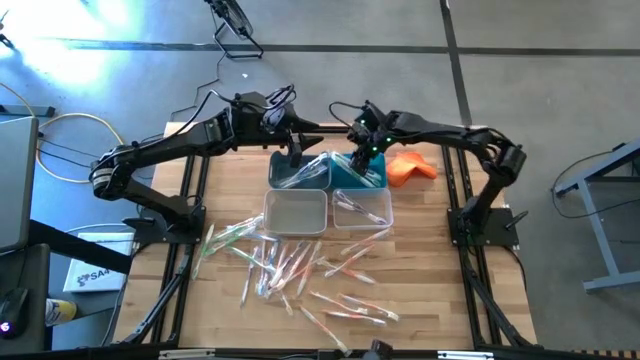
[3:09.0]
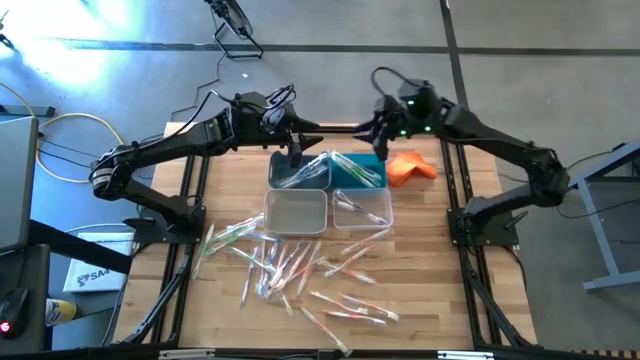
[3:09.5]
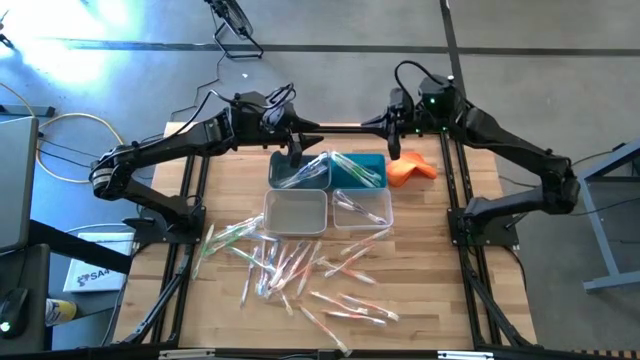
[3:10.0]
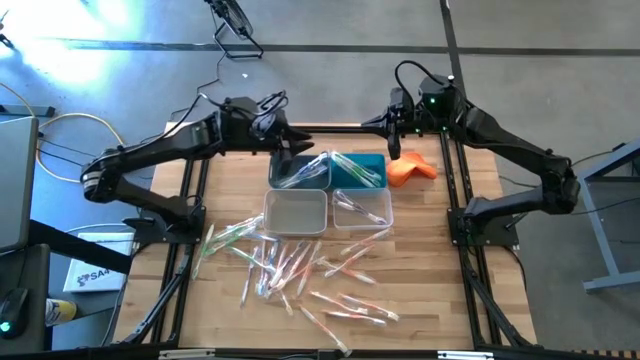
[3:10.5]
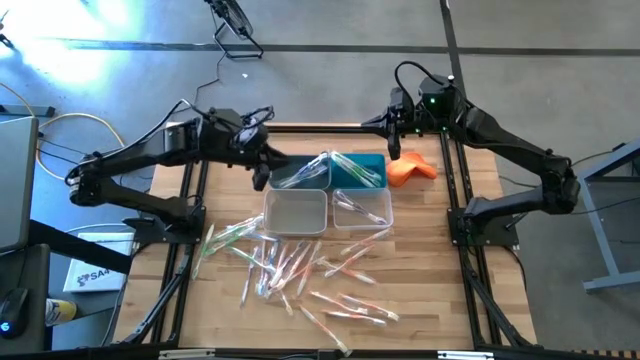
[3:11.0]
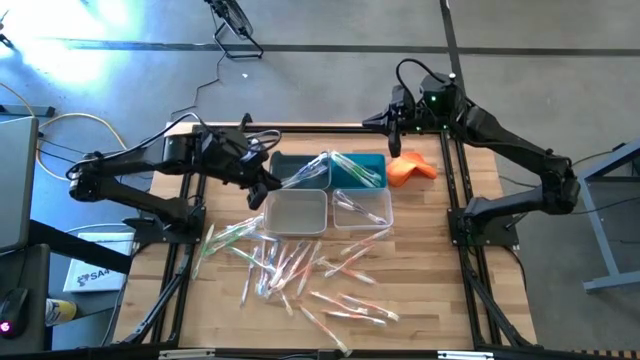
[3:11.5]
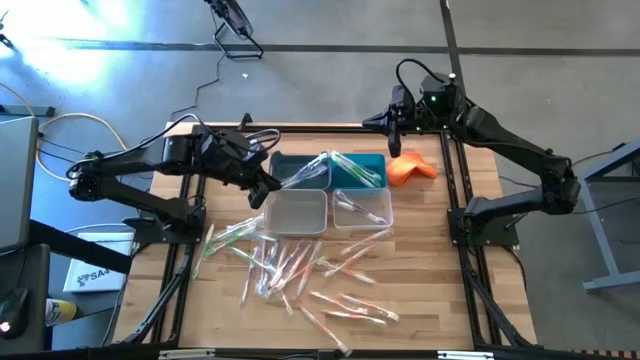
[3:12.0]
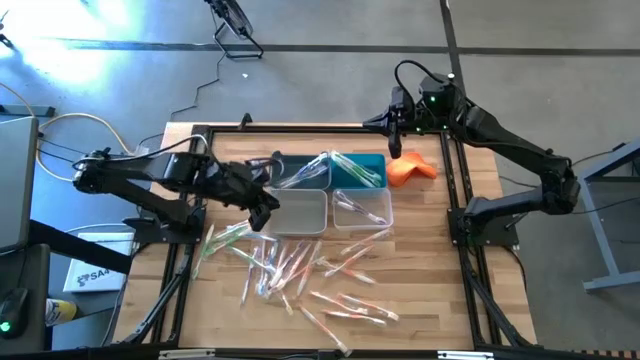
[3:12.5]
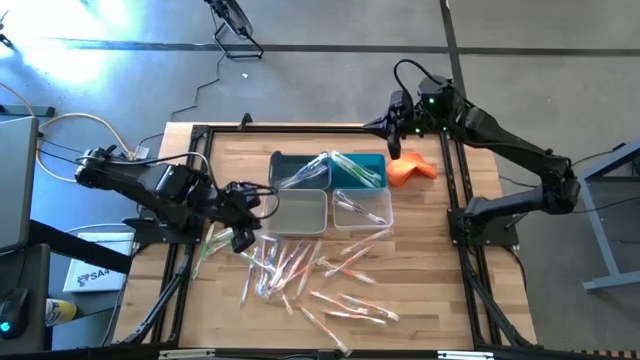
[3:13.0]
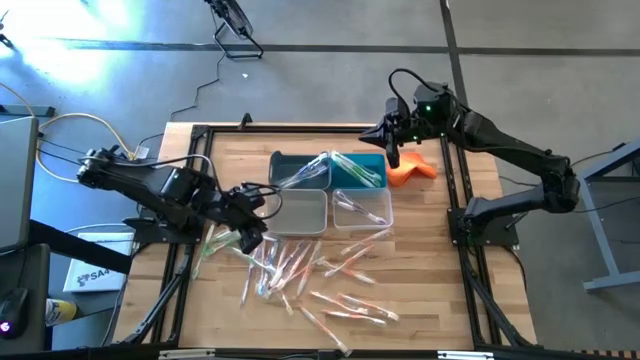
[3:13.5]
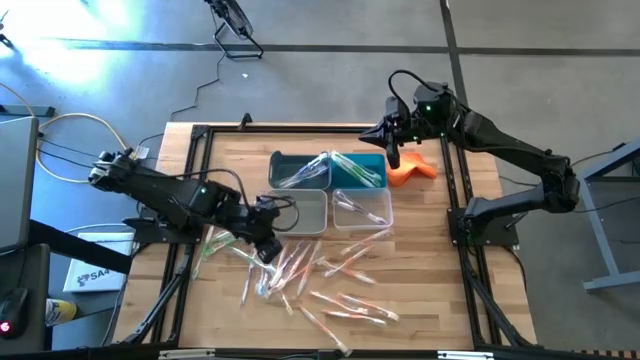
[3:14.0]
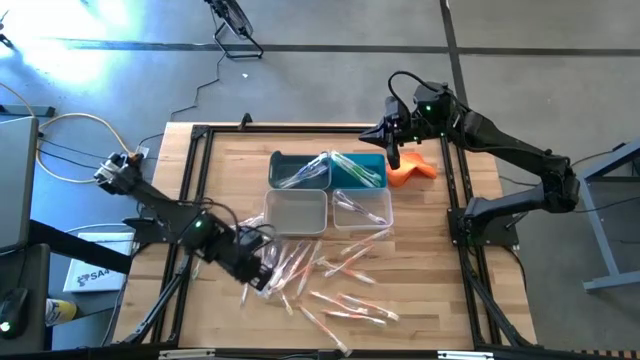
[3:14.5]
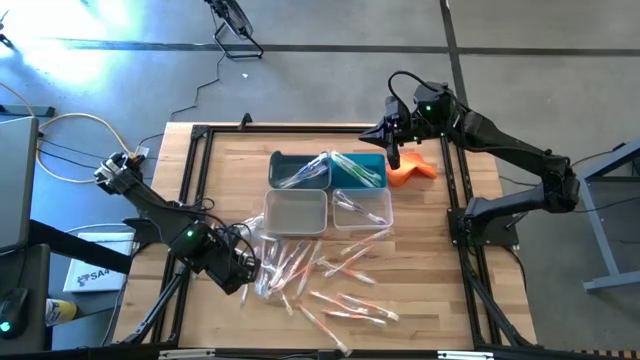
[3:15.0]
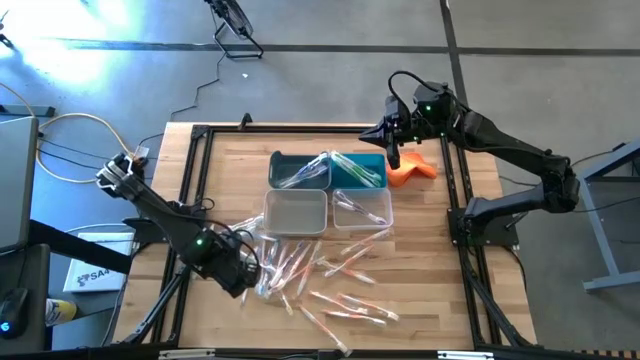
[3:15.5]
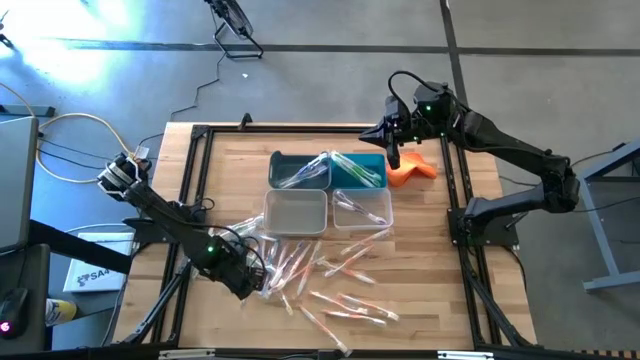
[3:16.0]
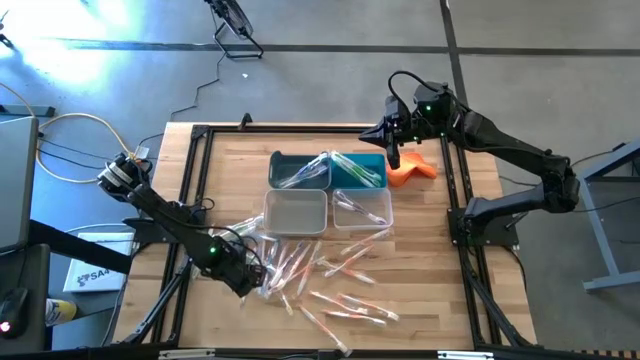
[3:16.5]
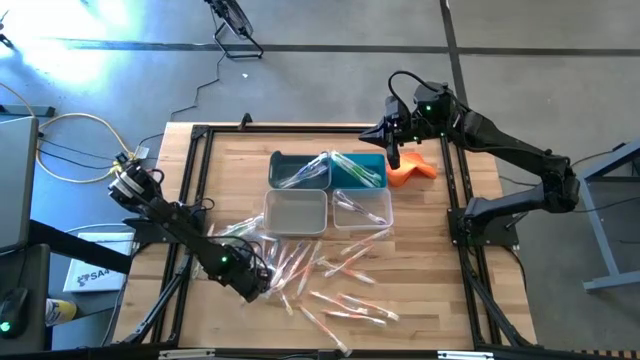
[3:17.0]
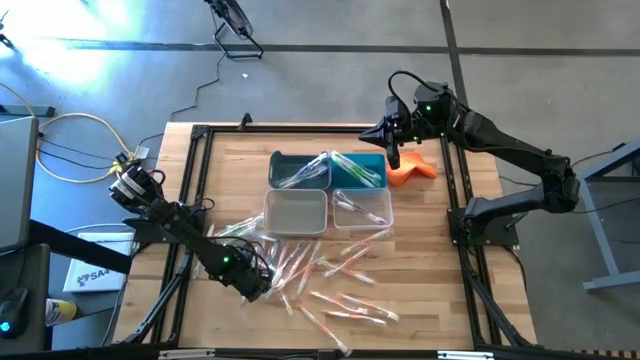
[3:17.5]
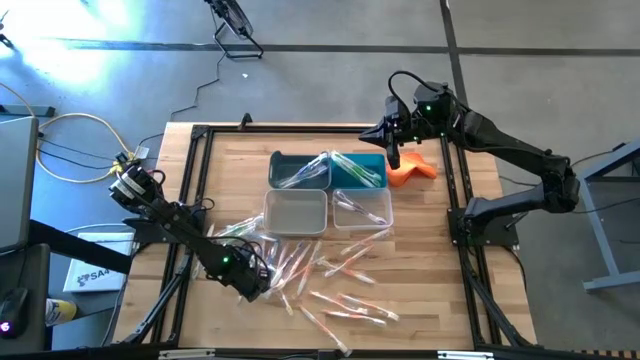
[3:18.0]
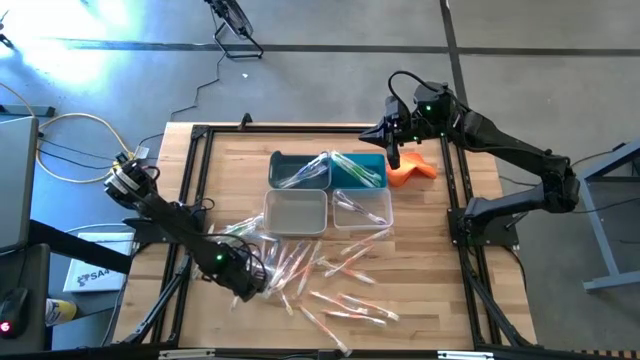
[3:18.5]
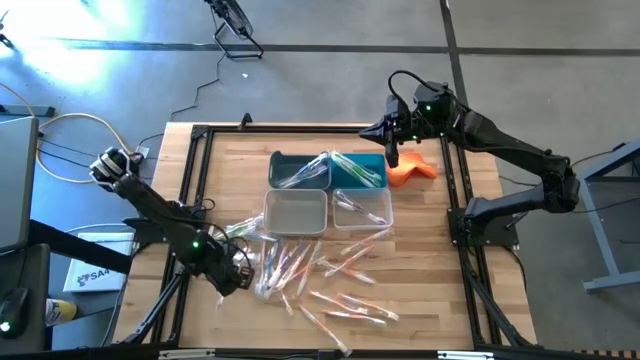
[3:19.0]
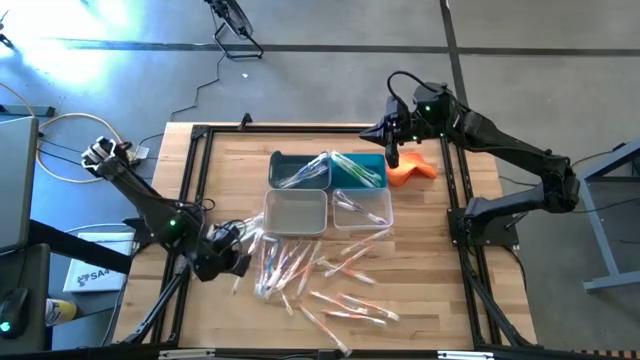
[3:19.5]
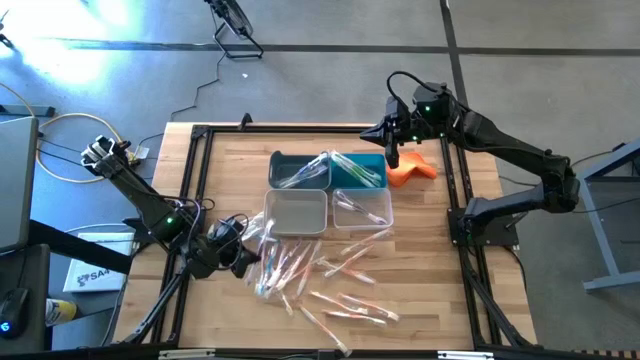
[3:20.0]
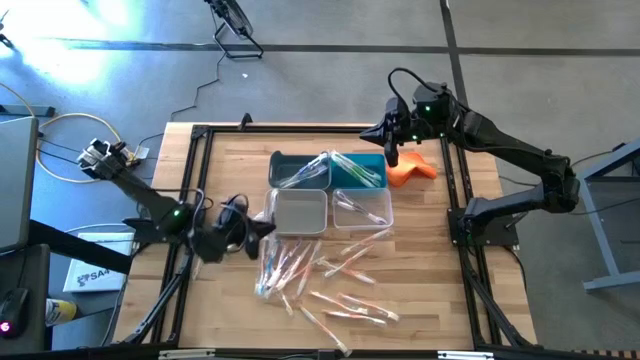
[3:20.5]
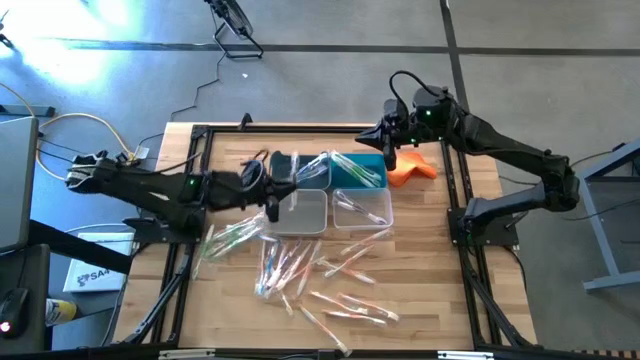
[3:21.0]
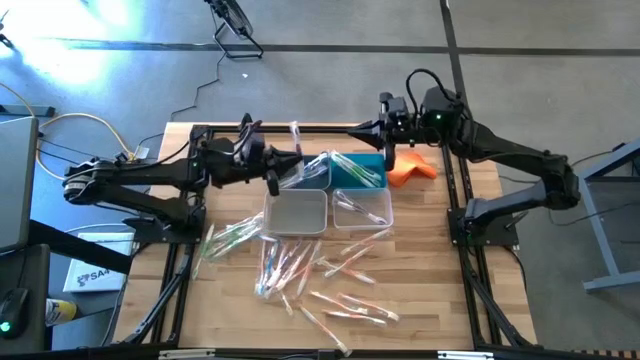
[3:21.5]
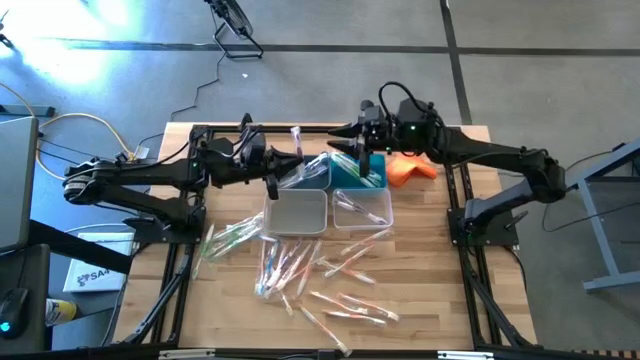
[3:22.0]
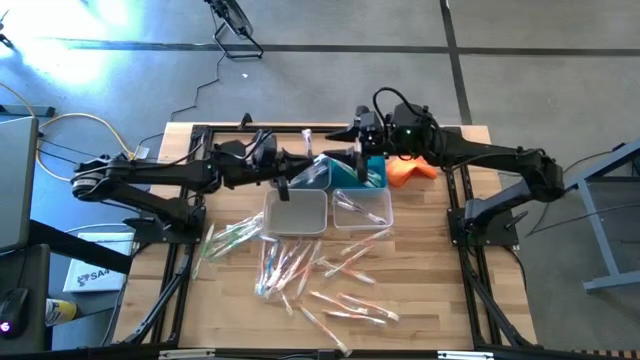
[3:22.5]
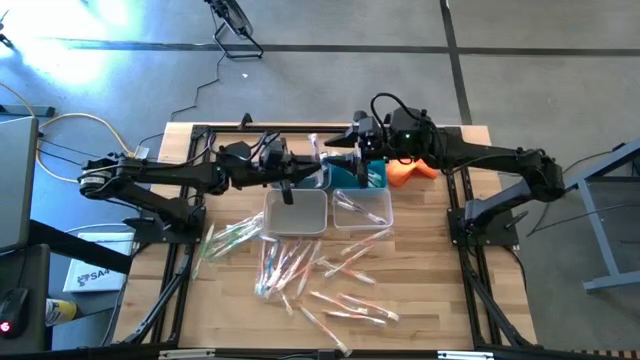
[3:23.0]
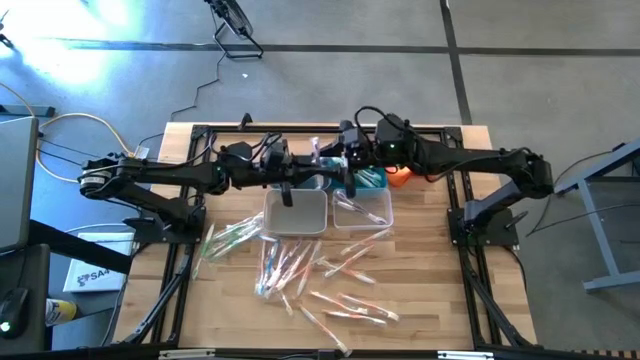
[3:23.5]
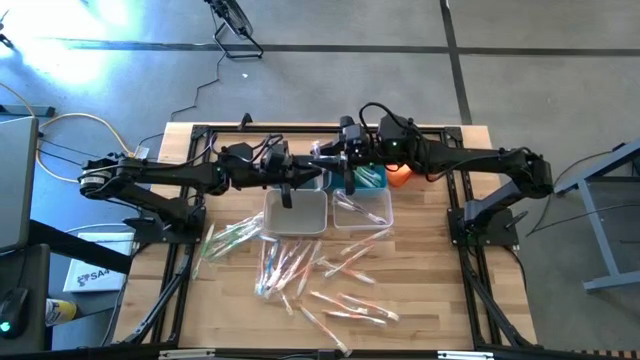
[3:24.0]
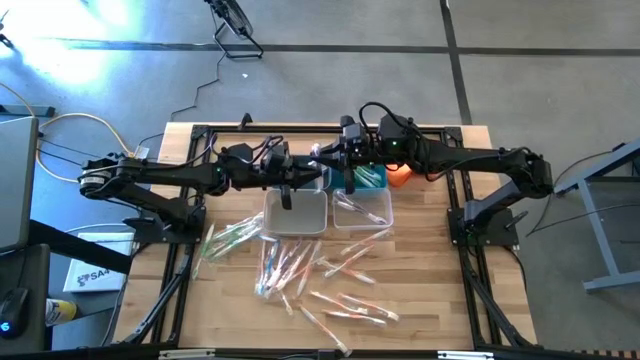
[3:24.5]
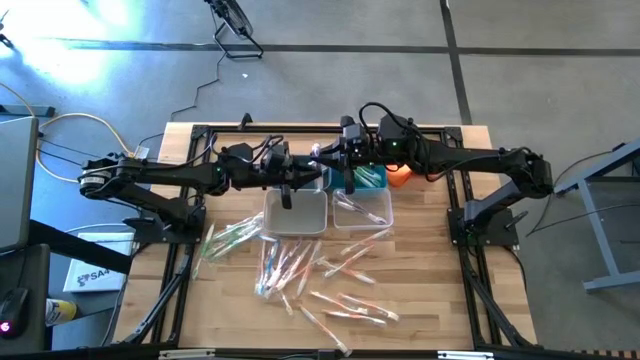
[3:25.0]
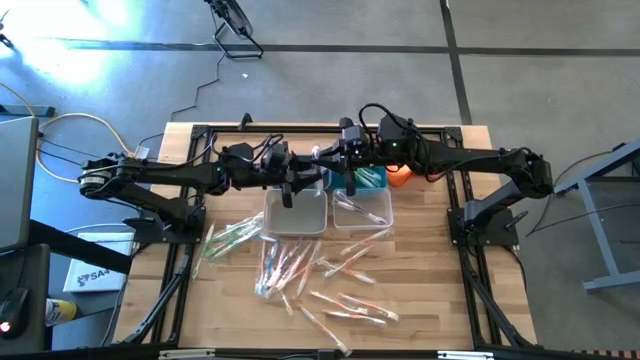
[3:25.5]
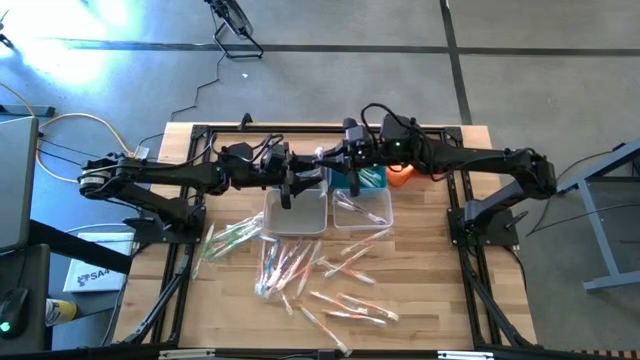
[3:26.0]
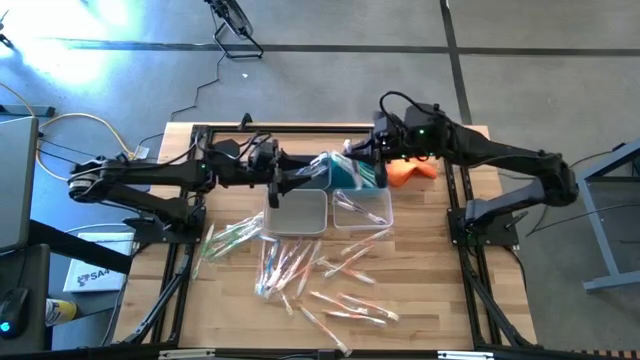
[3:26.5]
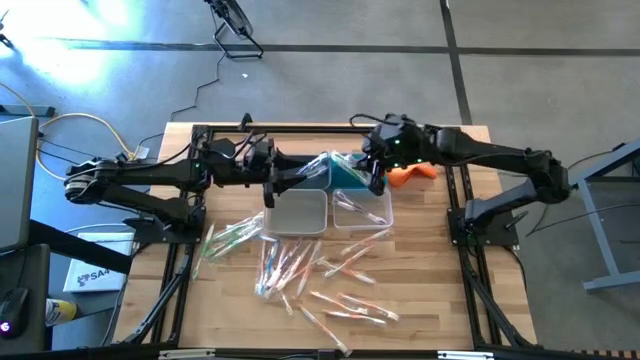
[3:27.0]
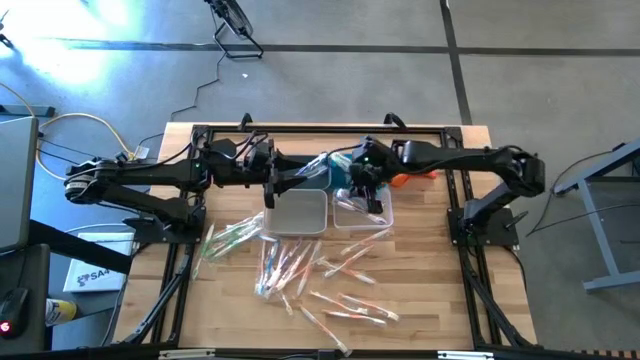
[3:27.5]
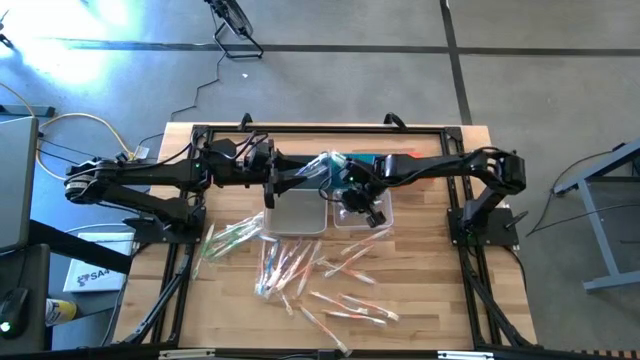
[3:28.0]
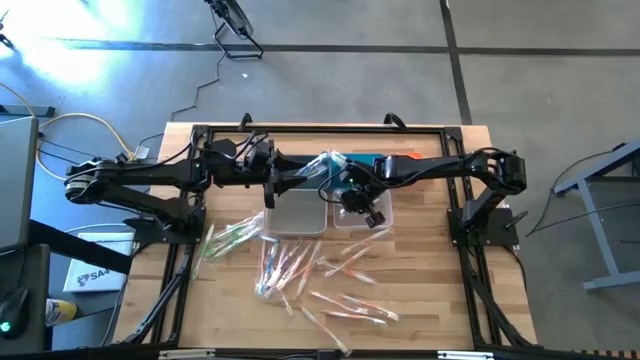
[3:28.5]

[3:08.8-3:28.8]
Task: Pick & Place Toothbrushes
Put the purple toothbrush into the transparent bin
